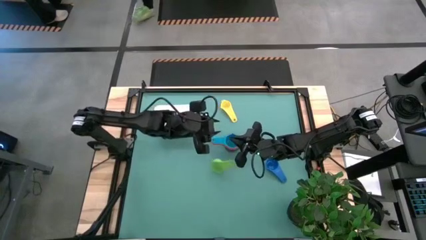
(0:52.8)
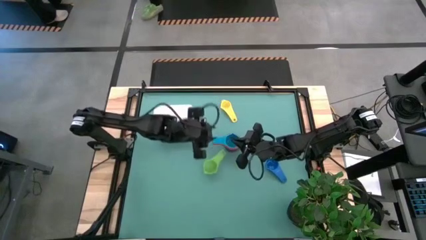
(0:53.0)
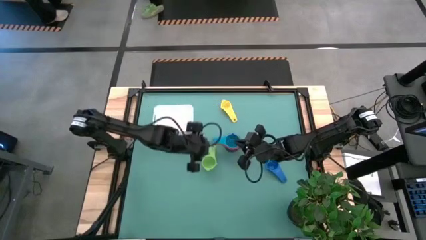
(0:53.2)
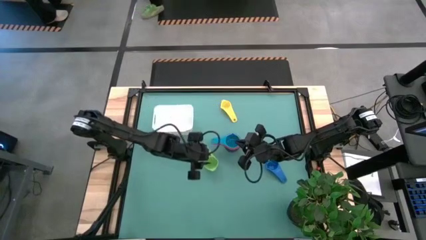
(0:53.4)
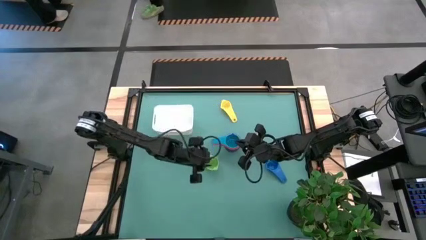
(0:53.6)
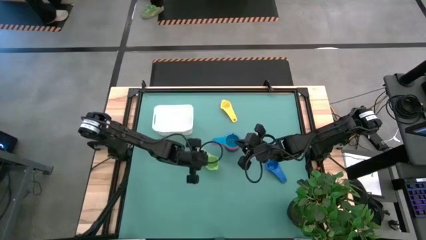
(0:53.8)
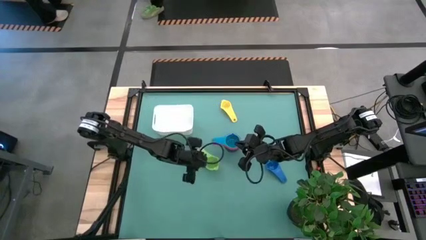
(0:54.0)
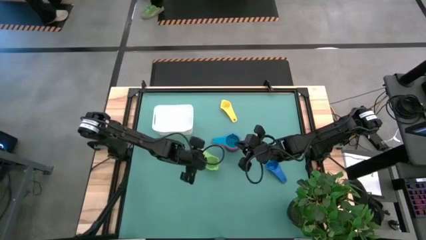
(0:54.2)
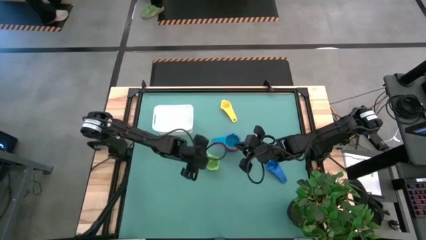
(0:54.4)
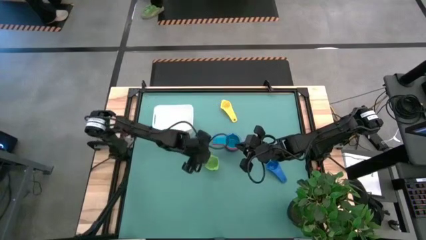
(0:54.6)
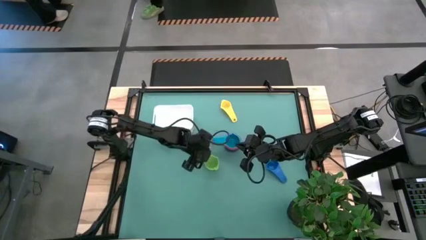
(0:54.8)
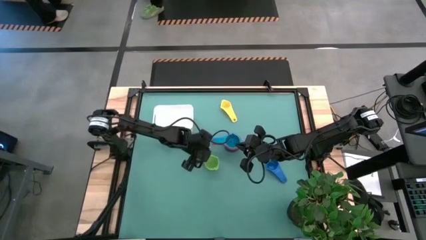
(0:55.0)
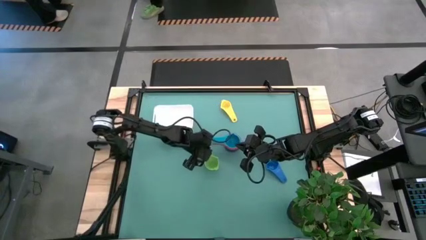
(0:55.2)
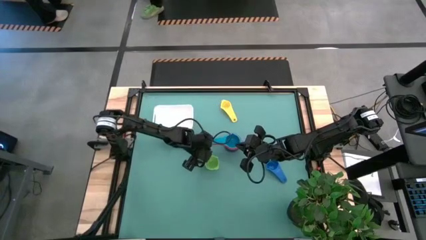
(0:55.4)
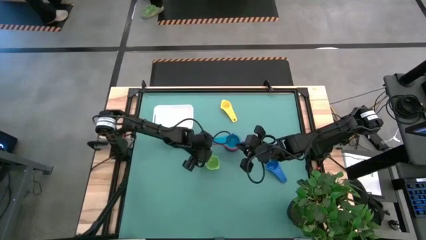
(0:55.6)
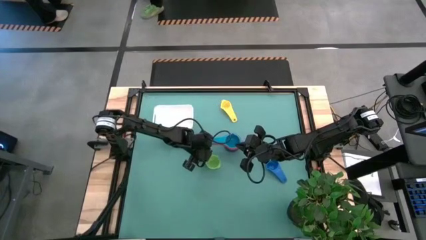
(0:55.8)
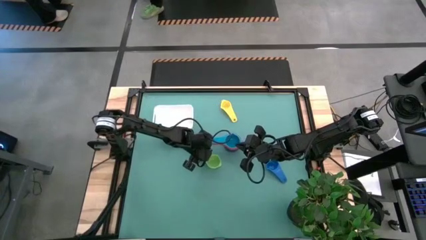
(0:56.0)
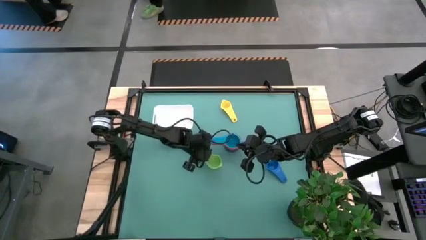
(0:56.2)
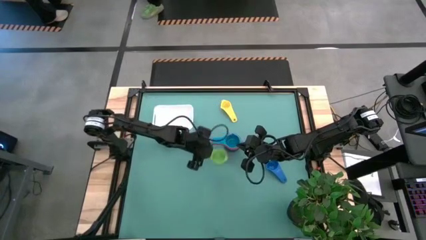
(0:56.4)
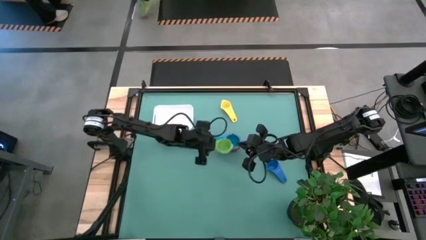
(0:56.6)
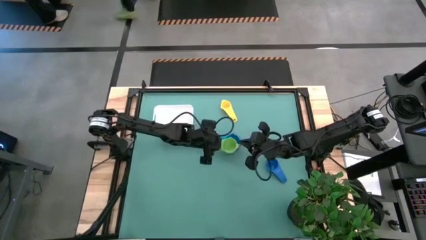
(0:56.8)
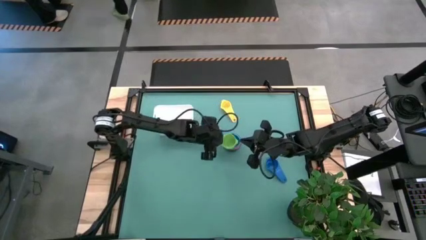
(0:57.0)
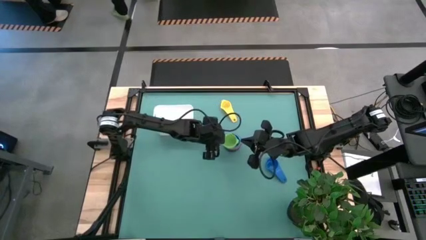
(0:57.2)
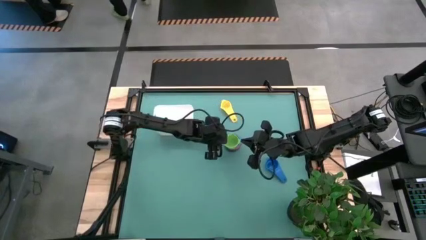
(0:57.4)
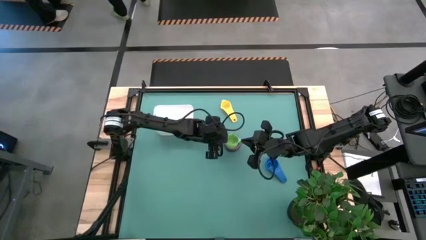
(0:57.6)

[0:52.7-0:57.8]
Task: Nest measuring cups in basket
Stack the green measuring on top of the light blue measuring cup

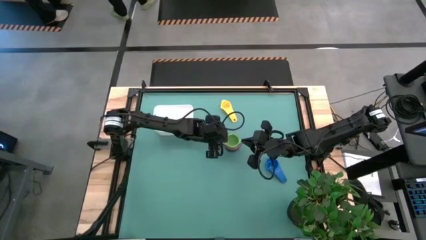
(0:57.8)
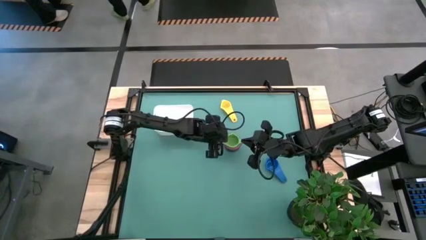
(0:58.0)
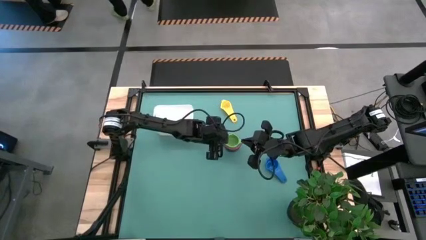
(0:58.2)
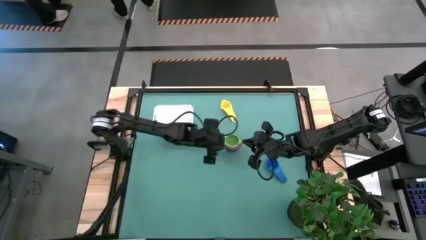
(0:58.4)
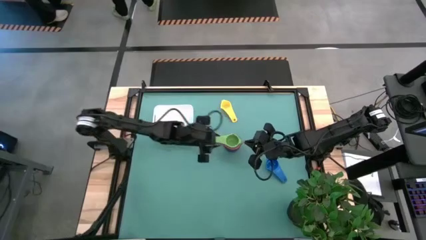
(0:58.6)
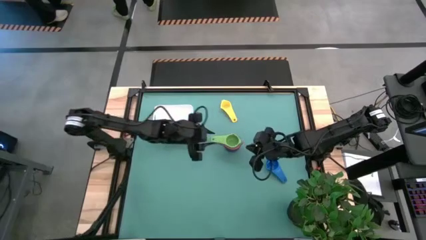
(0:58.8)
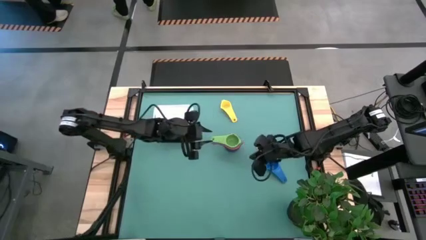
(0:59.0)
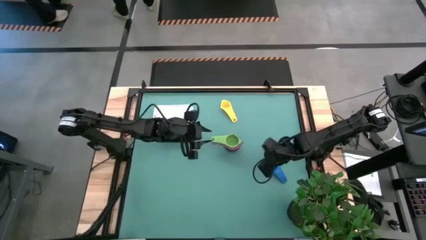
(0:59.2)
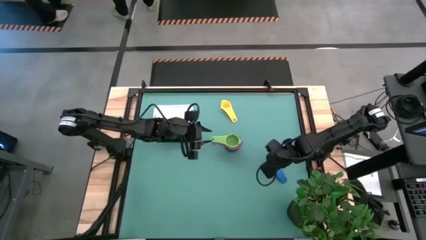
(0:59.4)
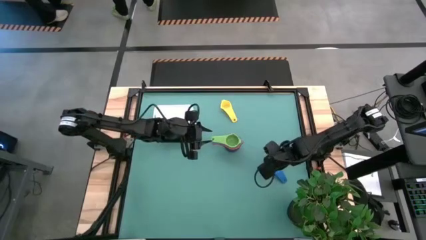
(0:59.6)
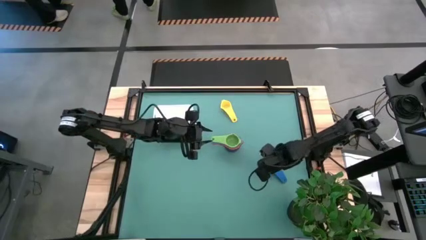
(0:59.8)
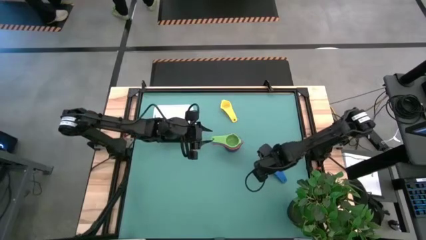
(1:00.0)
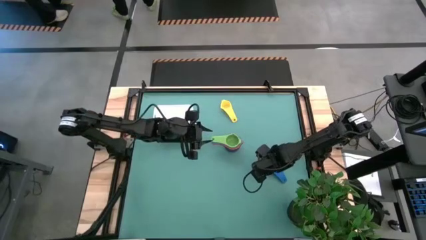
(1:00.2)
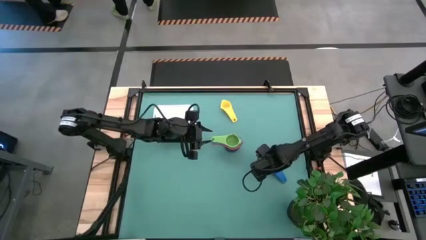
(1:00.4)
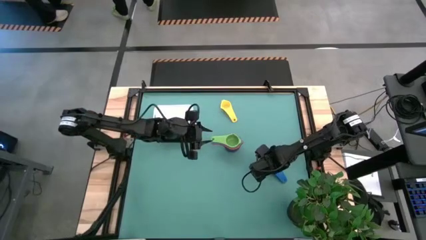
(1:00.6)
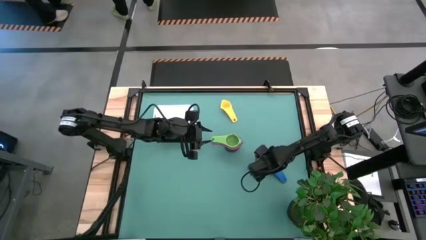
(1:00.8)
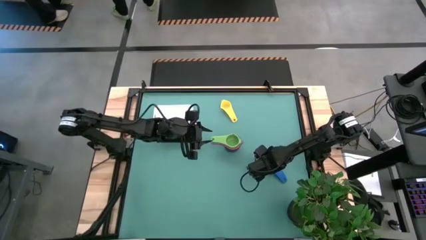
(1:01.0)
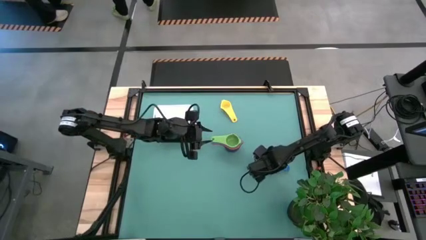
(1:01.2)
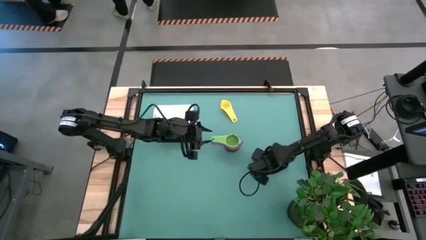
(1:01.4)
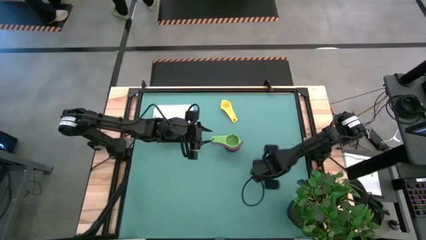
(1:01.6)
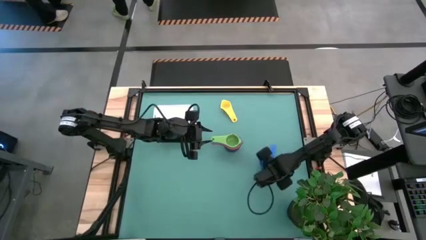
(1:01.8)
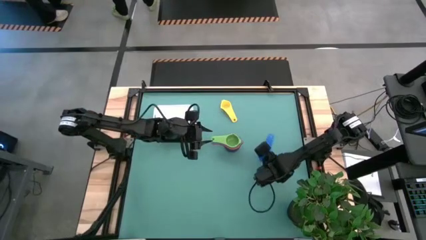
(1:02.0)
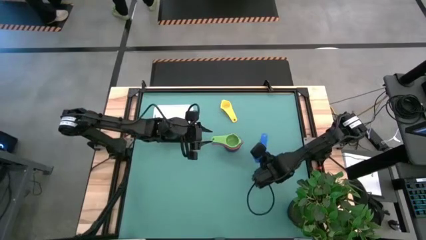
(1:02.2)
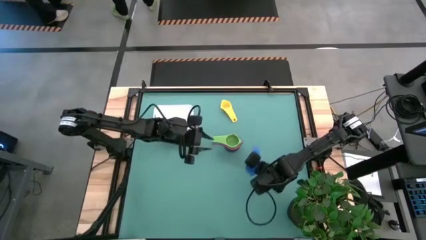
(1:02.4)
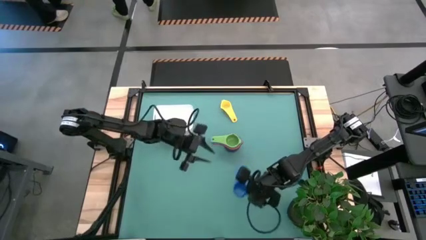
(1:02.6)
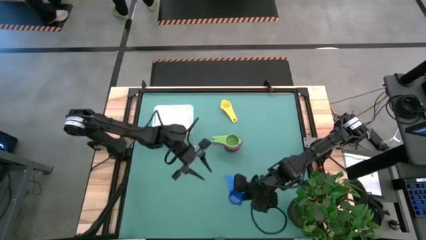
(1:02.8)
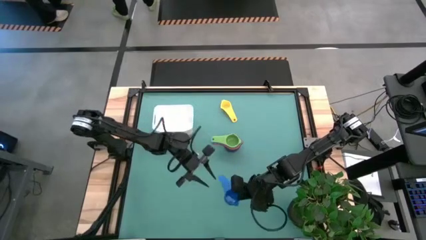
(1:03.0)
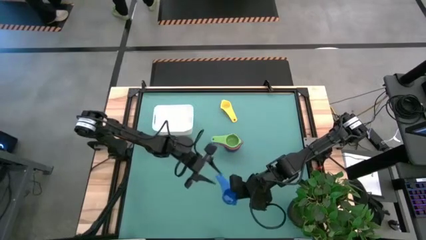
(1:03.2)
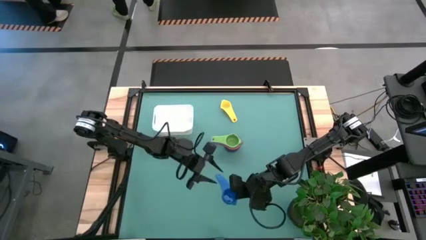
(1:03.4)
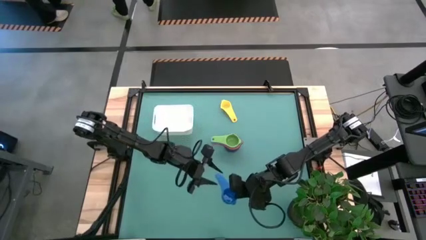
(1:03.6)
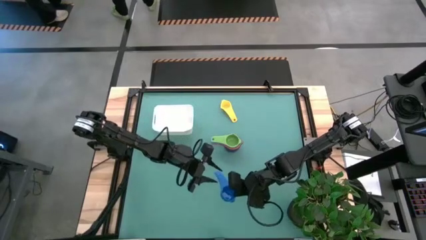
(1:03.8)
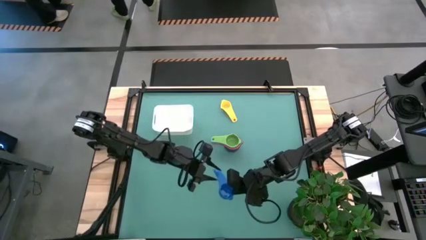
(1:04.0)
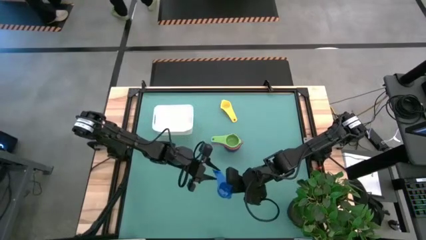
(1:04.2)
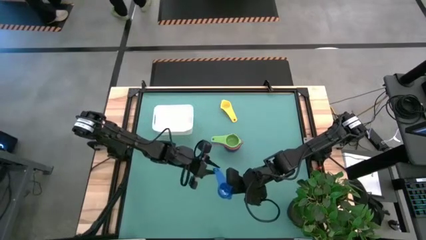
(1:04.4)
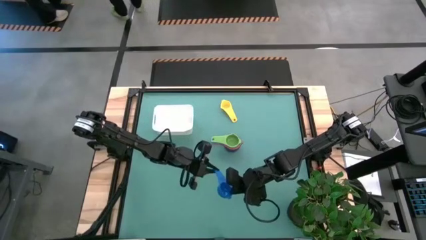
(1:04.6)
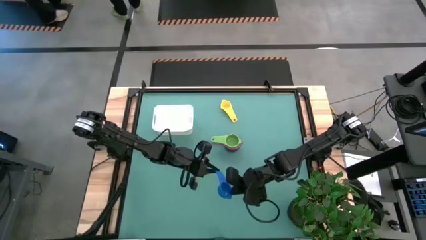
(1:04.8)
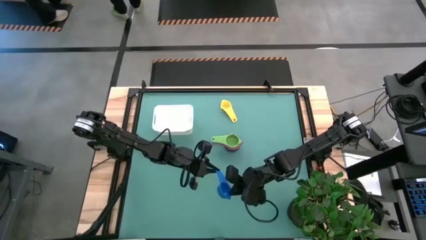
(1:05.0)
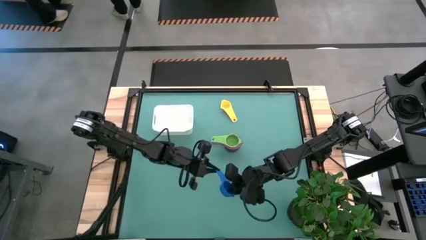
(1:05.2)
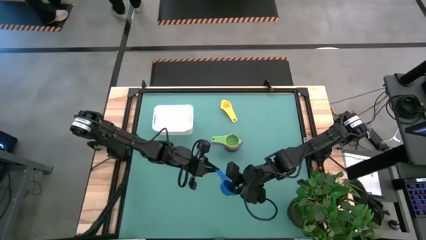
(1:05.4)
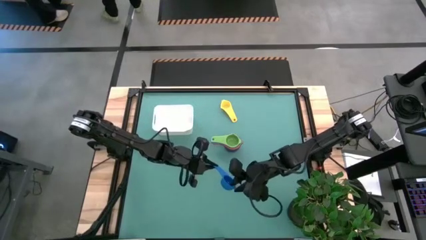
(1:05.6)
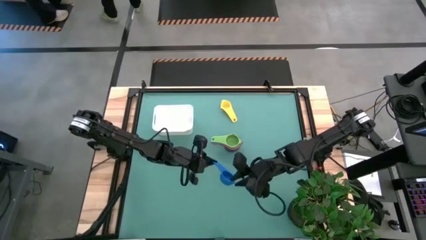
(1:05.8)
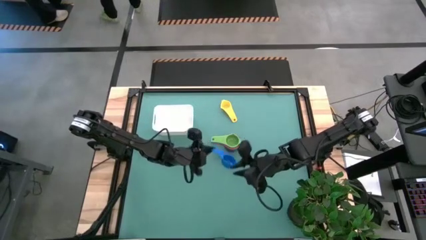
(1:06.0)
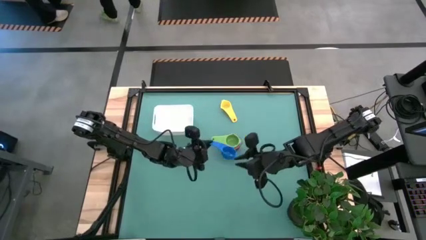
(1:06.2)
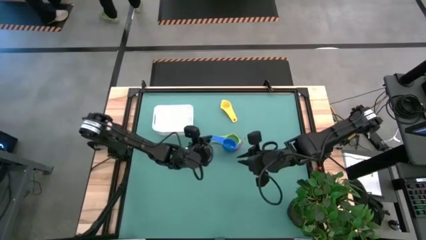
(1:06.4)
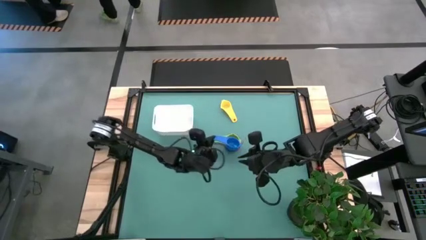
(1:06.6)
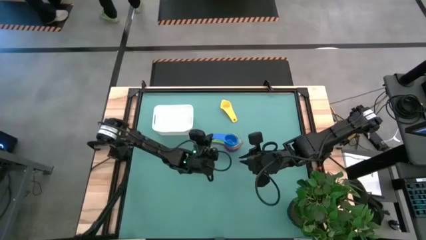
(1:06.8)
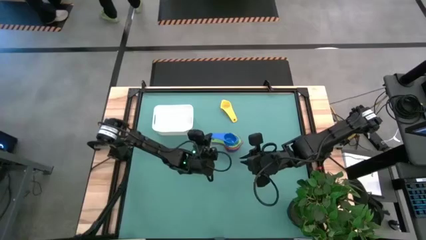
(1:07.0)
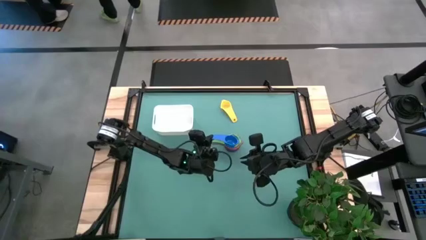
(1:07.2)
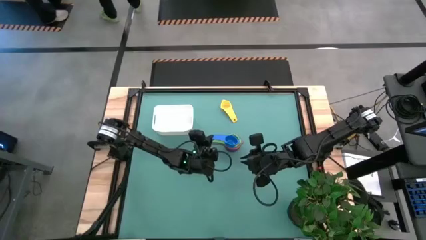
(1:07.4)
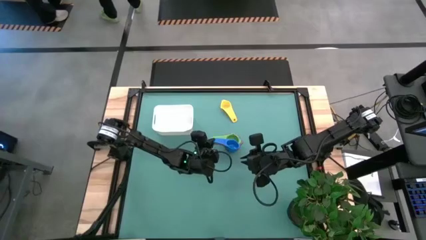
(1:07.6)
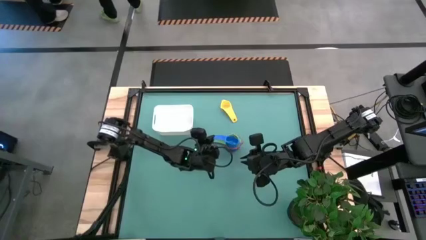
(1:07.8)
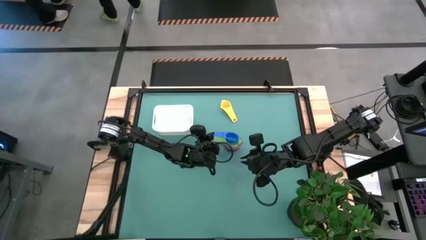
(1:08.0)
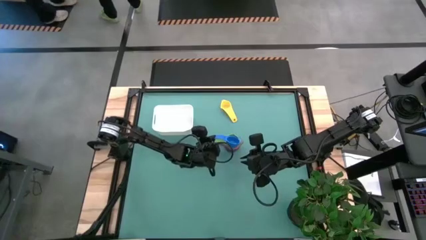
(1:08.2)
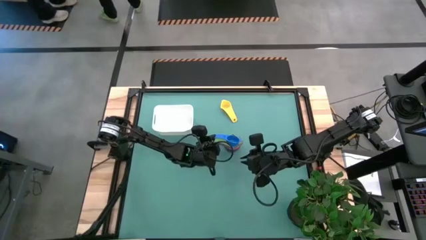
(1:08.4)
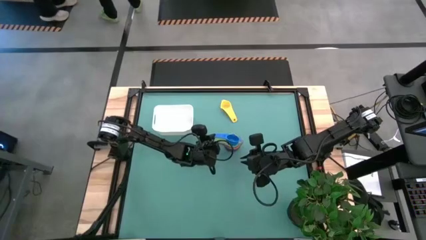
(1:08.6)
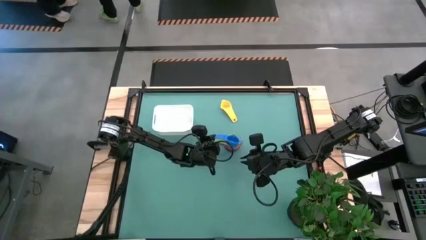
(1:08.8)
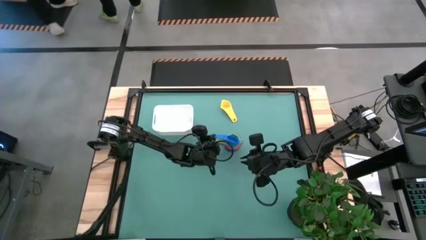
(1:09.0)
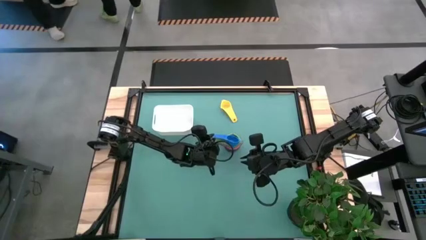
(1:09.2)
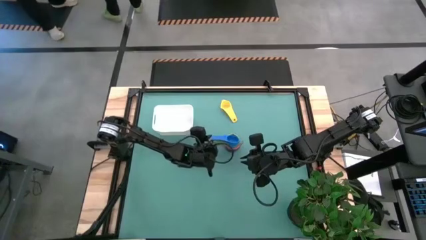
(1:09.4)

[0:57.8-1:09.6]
Stack the blue measuring cup on top of the green measuring cup

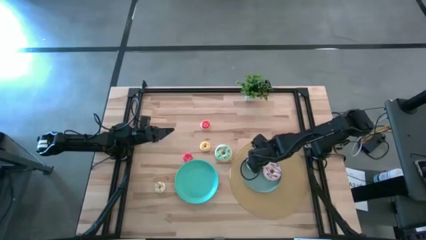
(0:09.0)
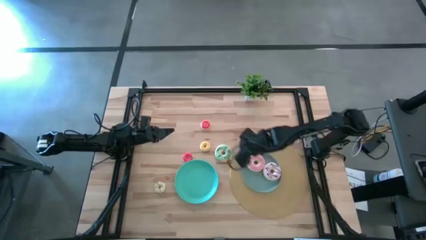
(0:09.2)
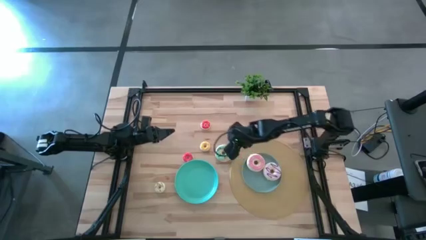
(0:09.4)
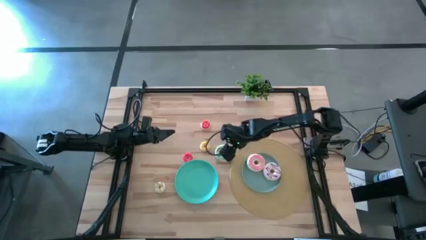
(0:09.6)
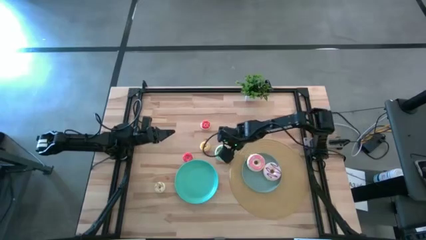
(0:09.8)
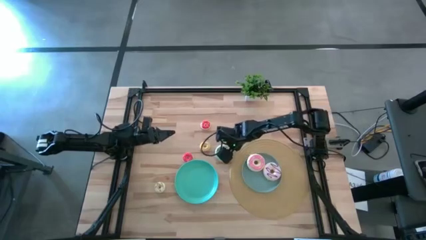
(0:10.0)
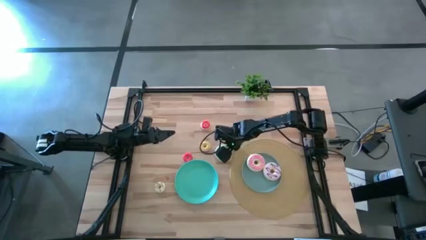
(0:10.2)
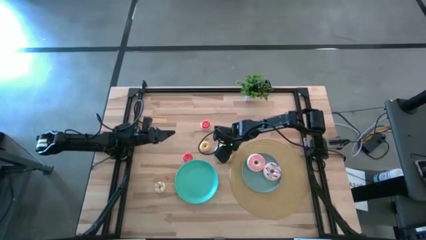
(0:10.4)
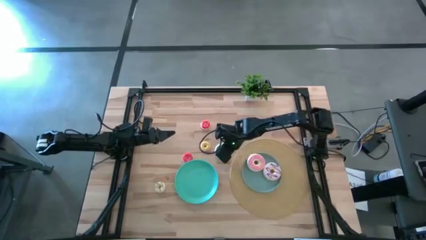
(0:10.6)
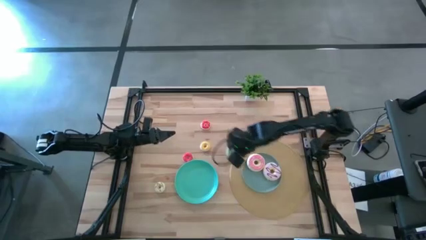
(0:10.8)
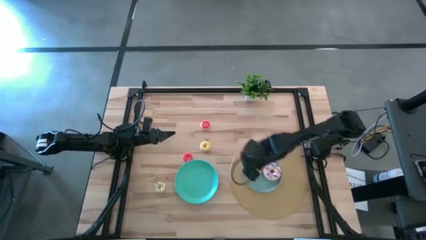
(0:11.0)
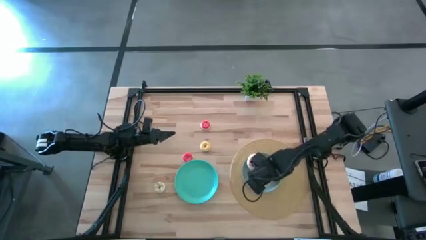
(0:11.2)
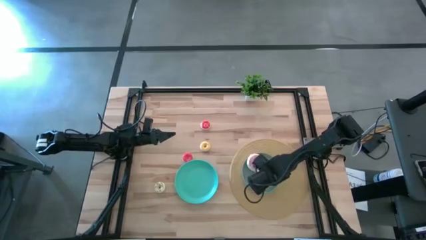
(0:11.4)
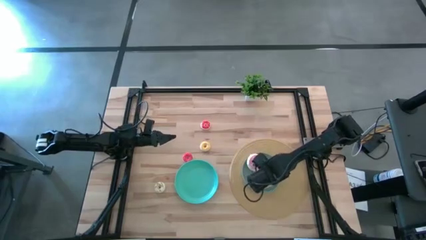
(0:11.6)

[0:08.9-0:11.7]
Task: Pick & Place donuts
Put the large green donut on the blue plate
